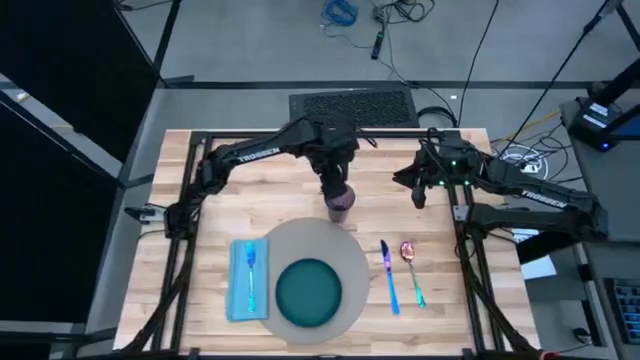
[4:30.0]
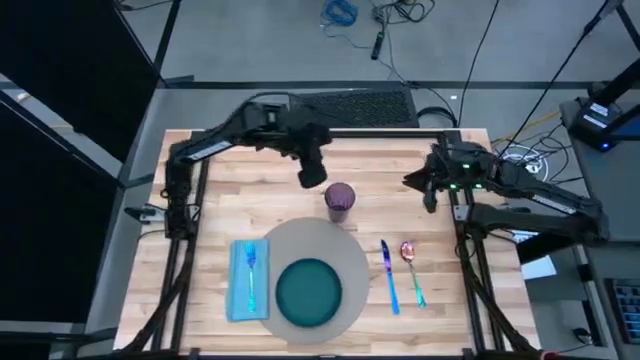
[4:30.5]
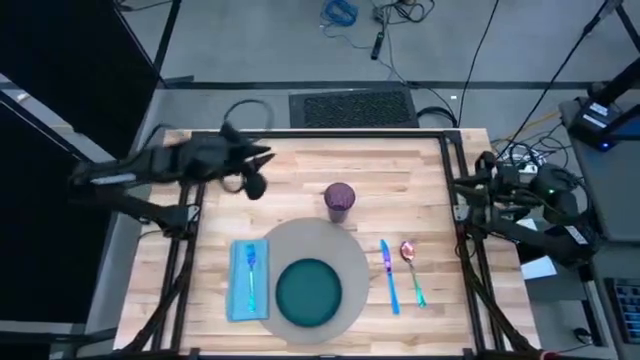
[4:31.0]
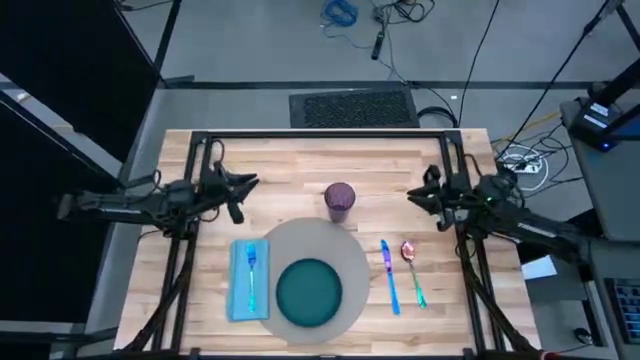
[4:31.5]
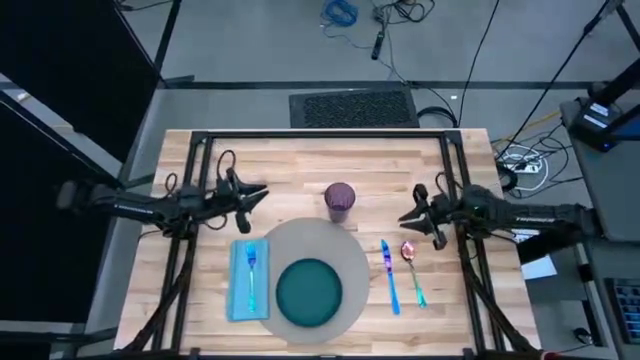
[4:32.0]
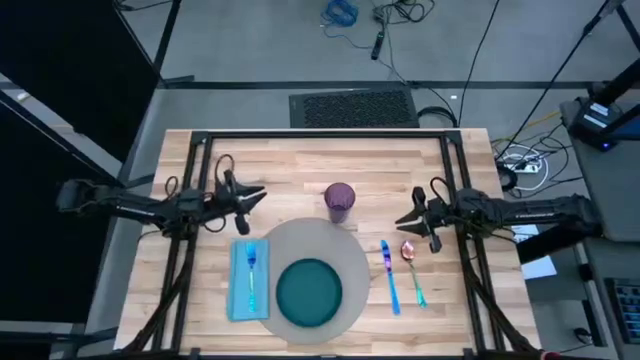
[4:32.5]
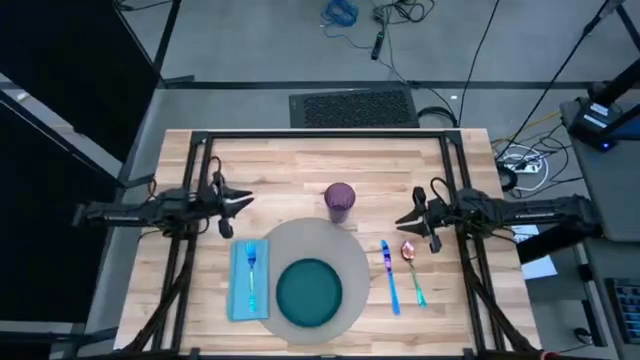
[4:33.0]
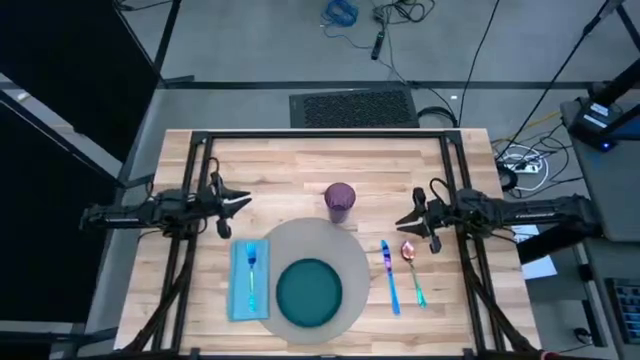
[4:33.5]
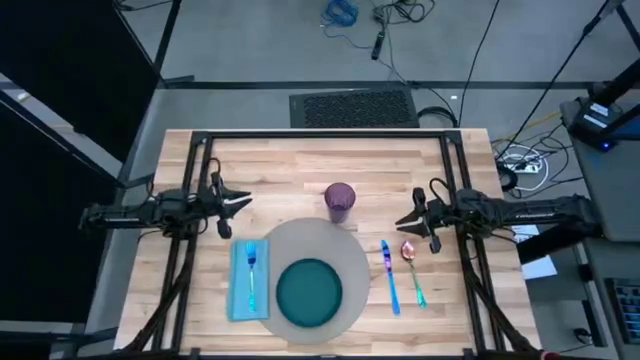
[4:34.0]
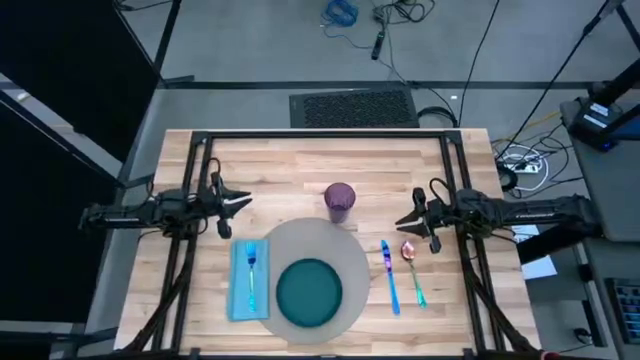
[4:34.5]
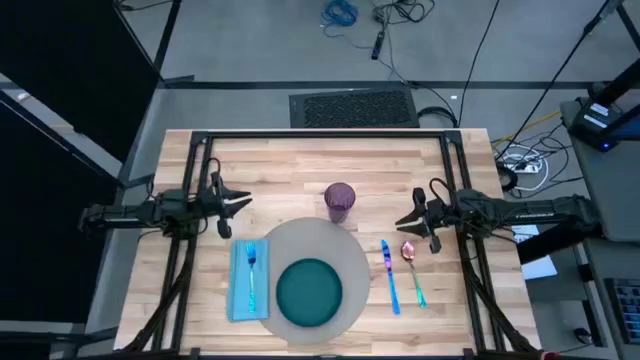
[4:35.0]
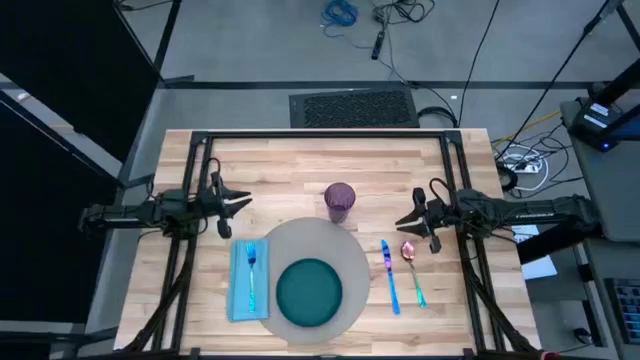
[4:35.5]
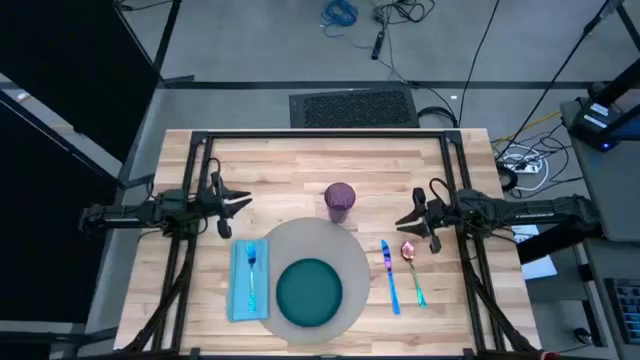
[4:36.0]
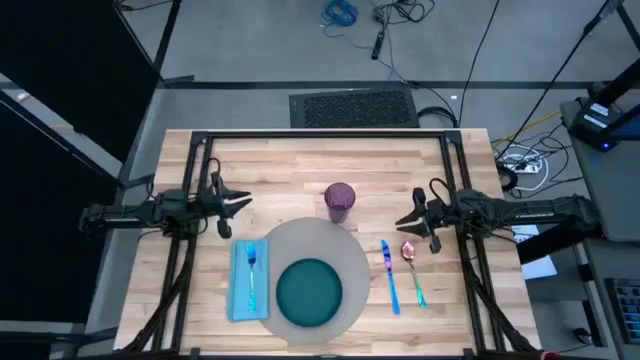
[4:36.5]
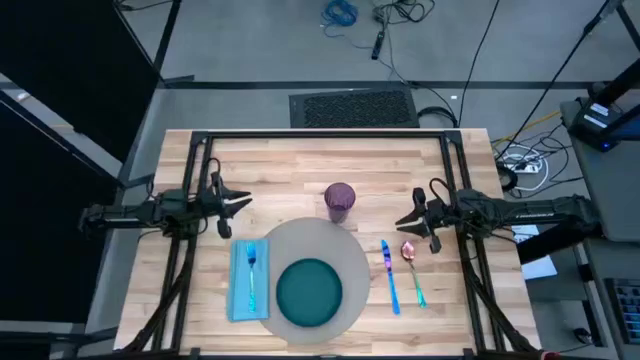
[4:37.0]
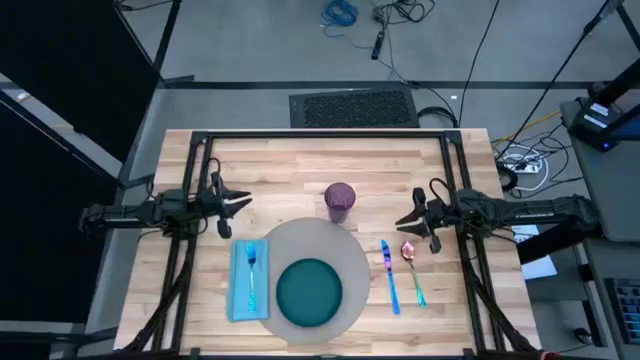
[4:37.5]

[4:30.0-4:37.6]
Task: Set table place
Return to Home Position

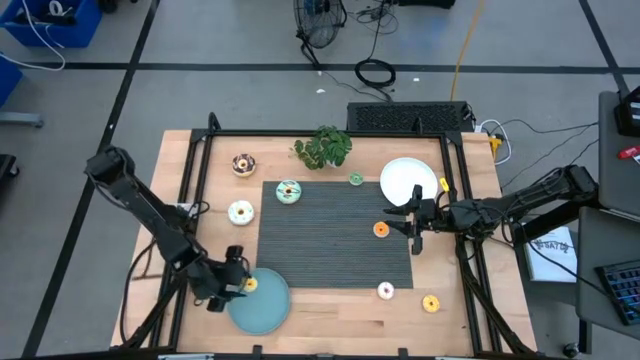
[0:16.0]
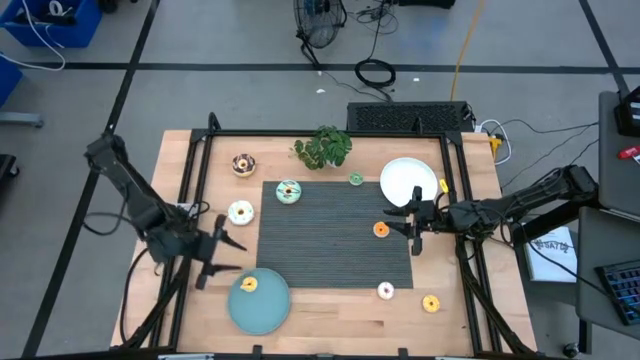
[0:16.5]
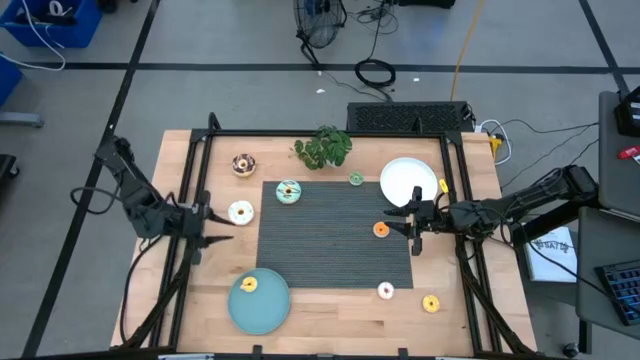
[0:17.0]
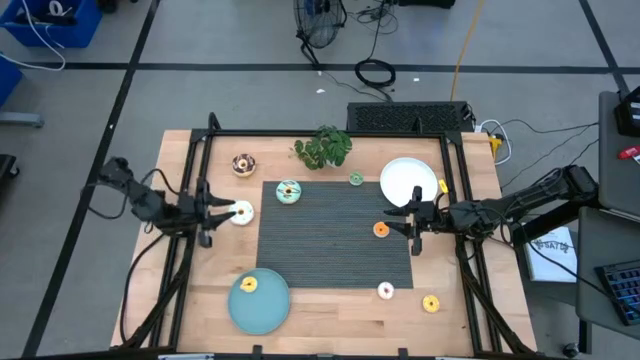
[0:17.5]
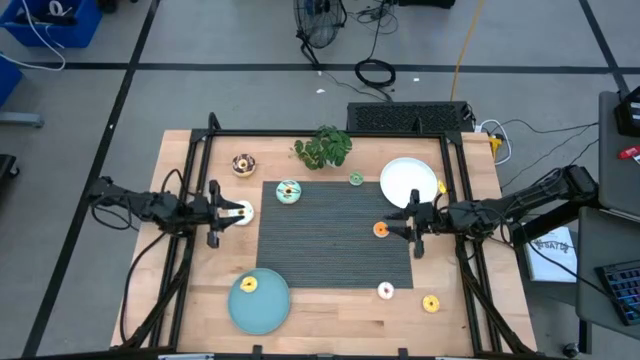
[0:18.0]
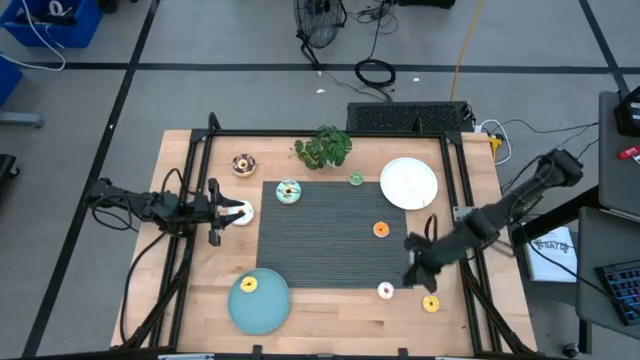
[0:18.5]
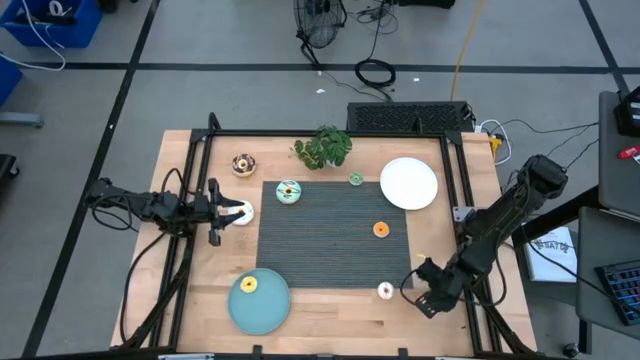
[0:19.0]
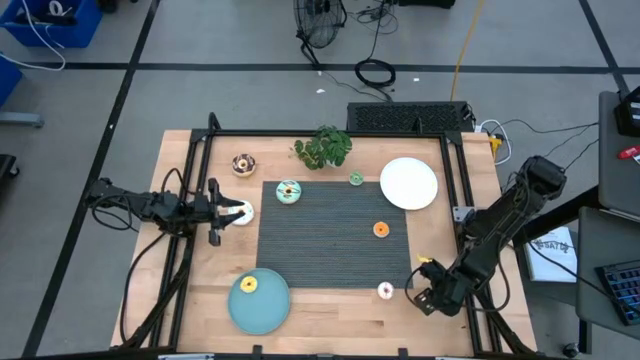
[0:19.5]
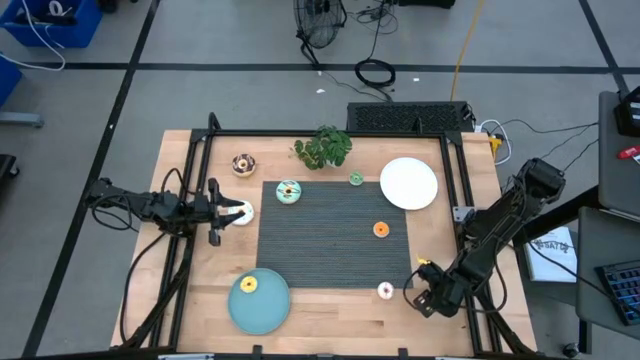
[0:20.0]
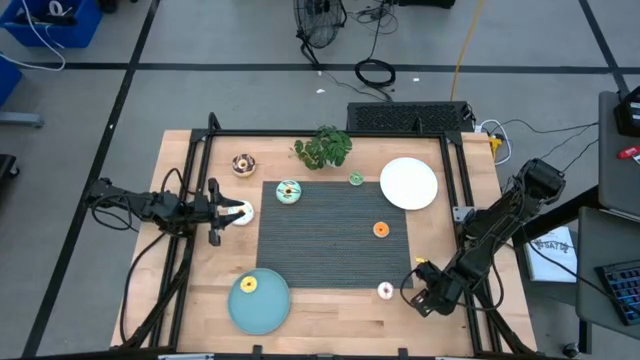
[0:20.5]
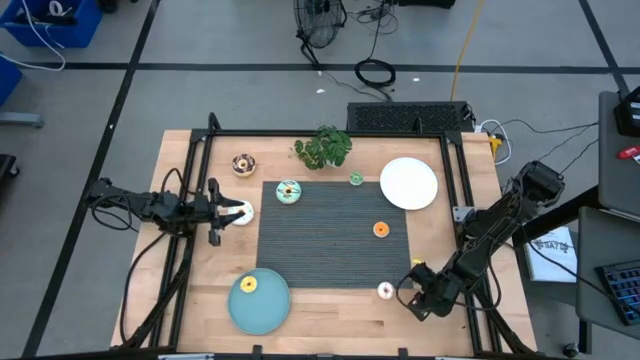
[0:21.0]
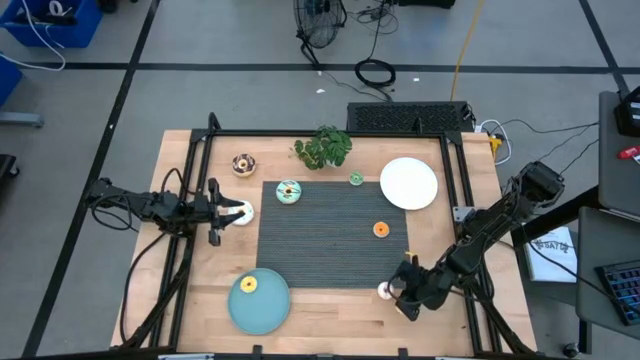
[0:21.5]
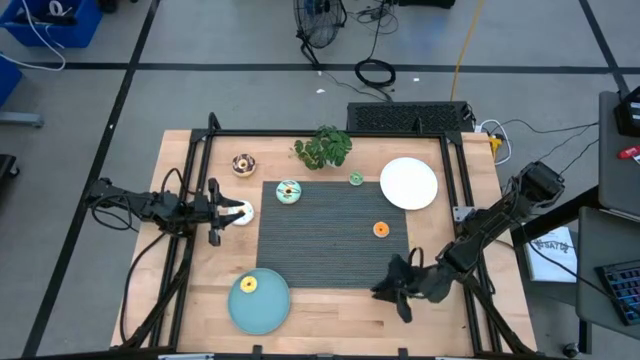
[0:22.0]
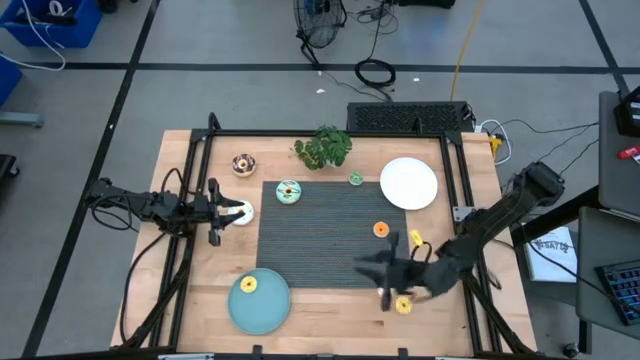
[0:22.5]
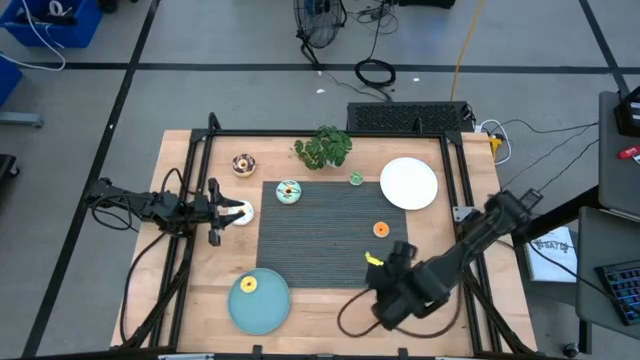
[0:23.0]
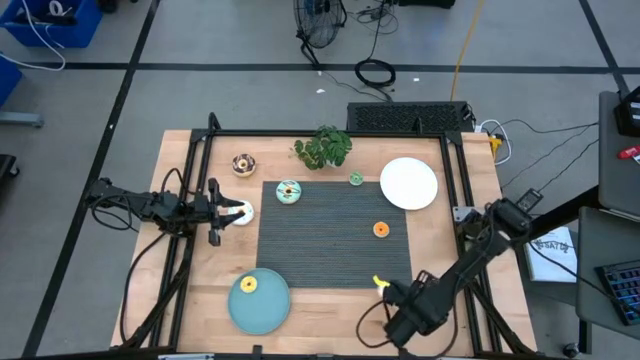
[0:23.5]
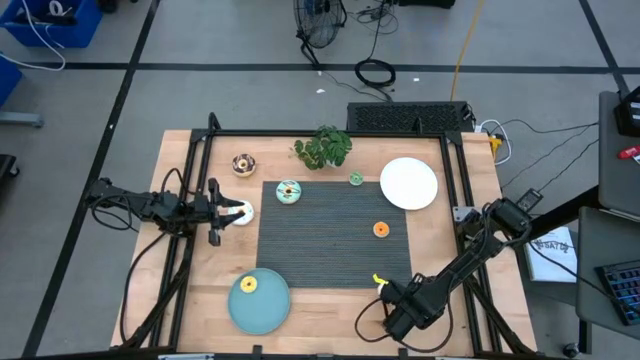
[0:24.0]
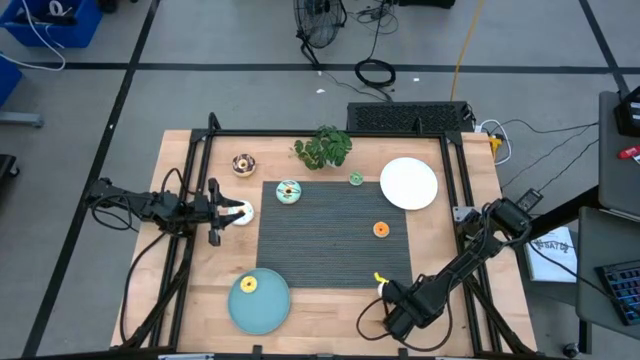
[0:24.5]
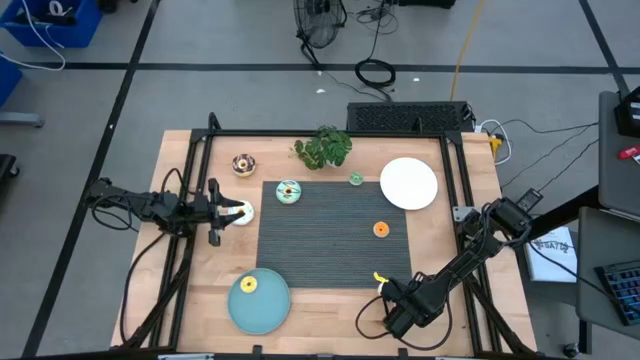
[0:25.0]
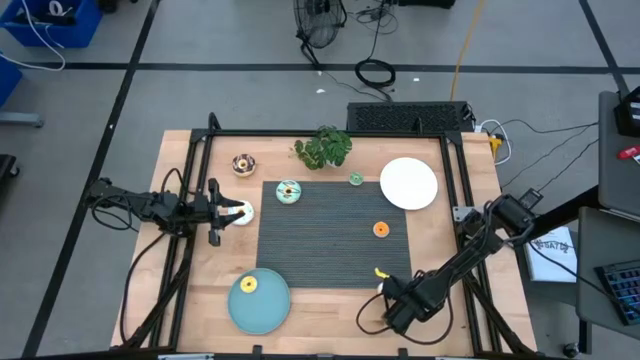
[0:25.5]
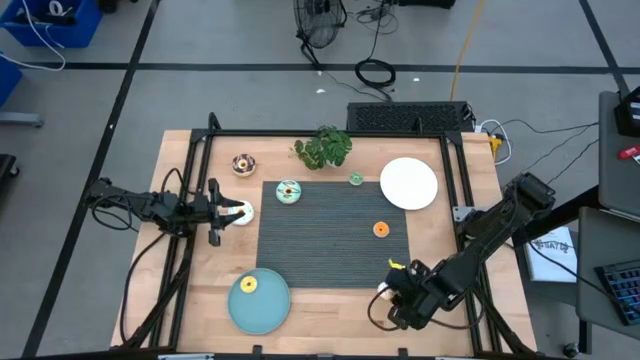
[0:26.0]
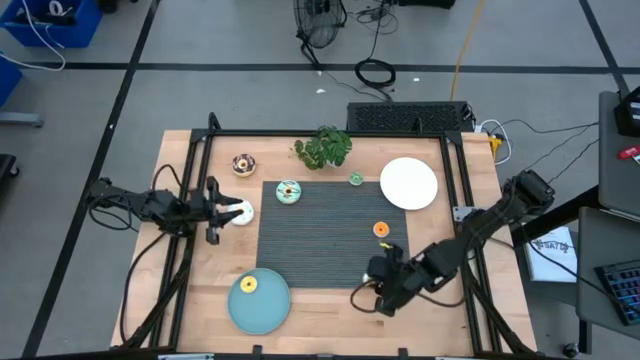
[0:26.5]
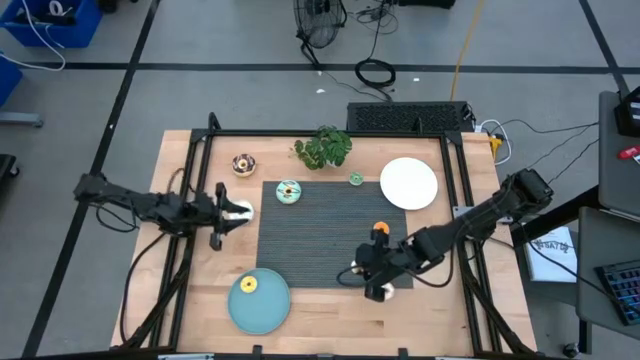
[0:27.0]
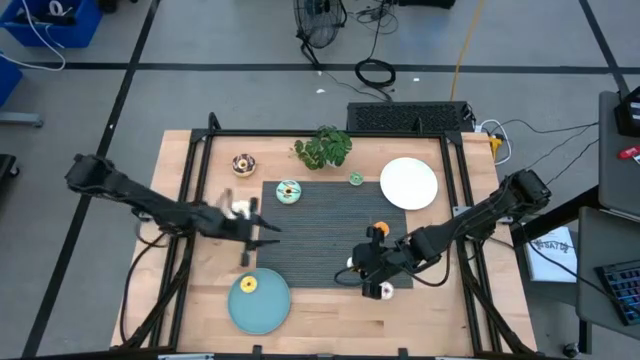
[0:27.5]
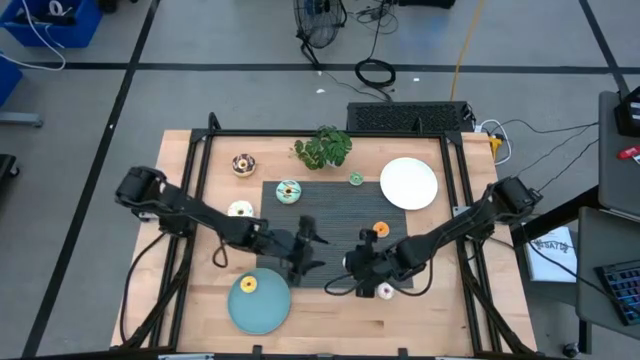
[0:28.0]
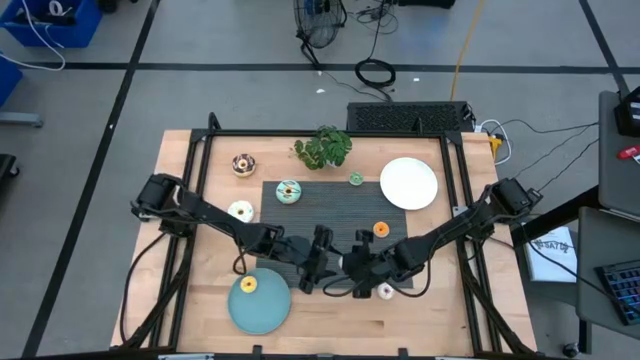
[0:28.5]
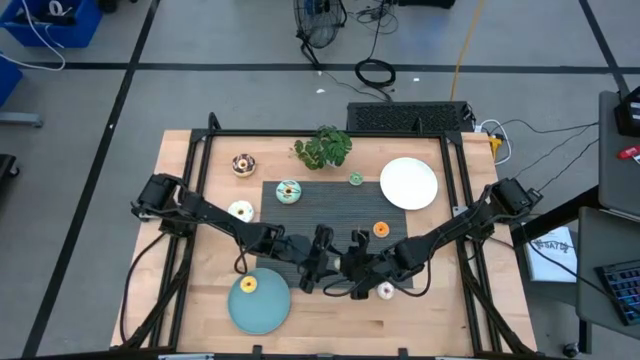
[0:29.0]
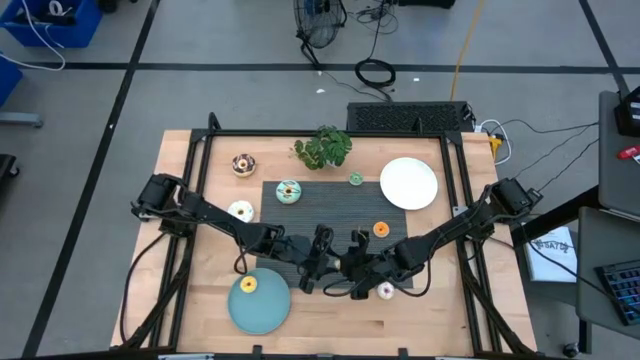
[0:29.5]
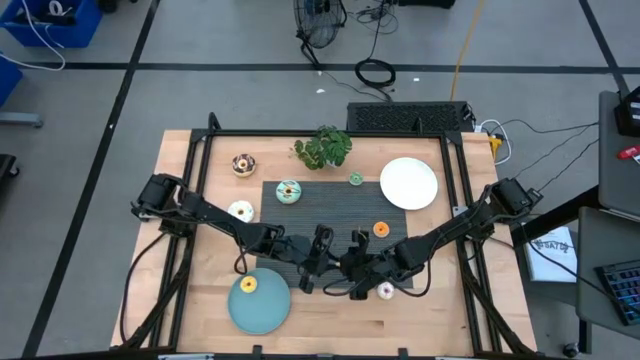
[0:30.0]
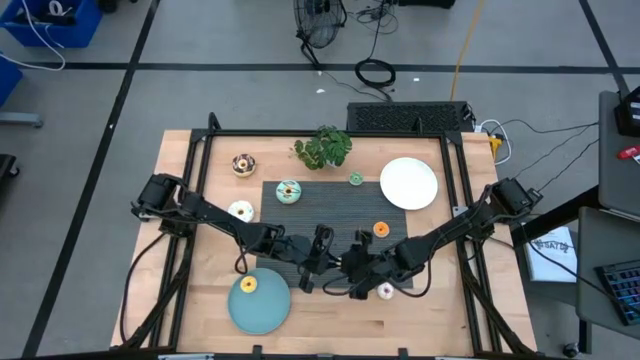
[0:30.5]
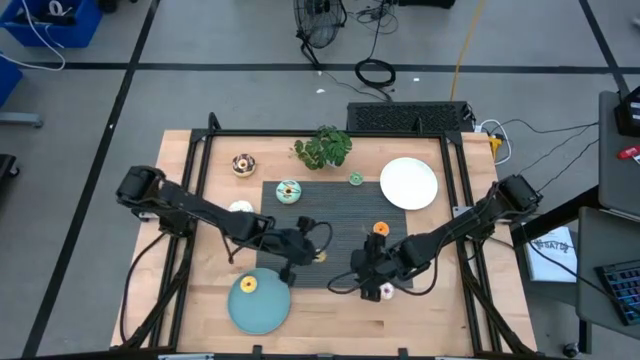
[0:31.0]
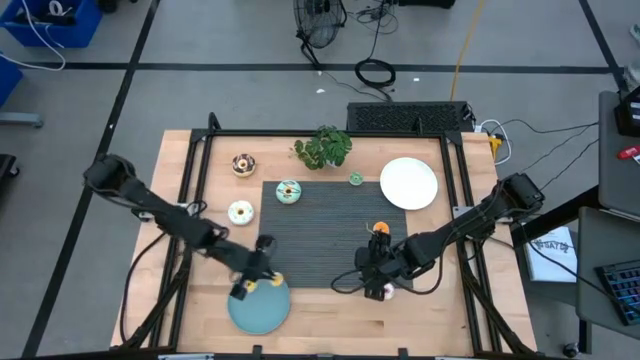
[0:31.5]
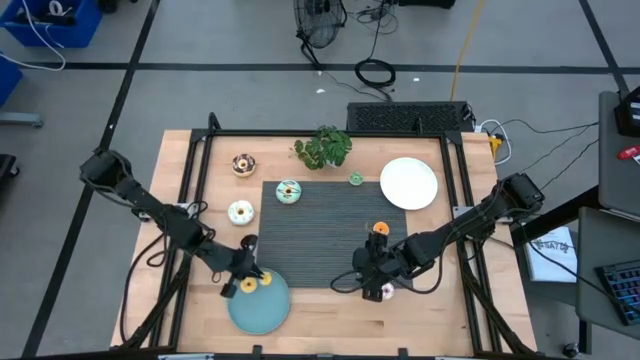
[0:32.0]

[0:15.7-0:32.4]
Task: Pick & Place donuts
Put the small yellow donut on the blue plate
